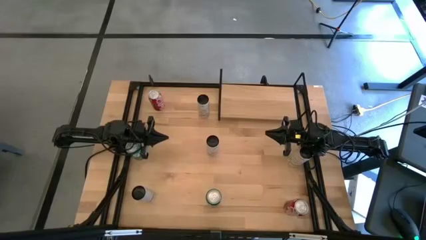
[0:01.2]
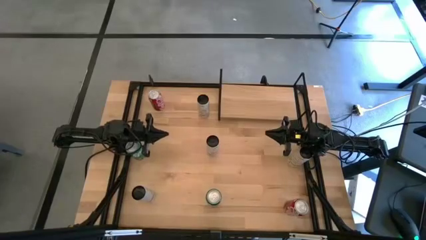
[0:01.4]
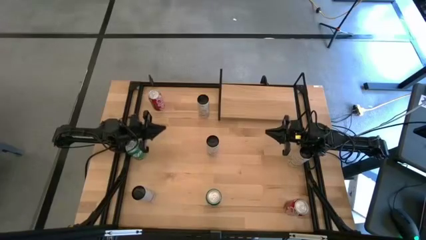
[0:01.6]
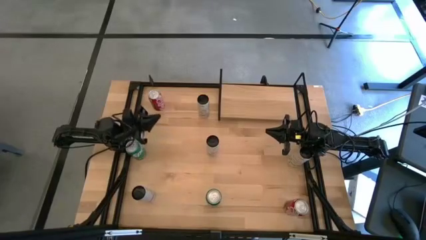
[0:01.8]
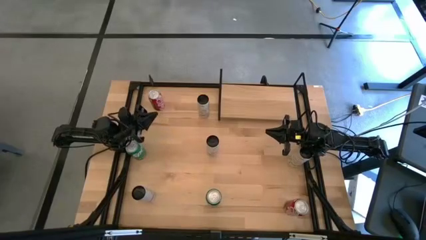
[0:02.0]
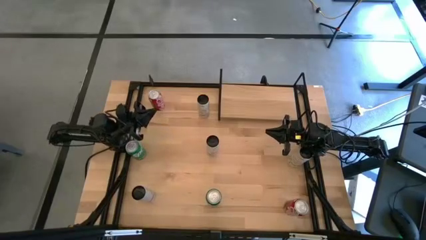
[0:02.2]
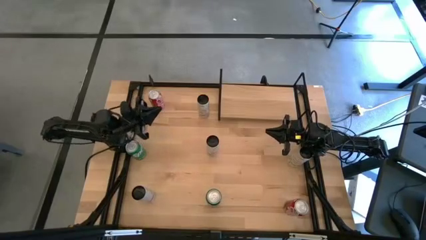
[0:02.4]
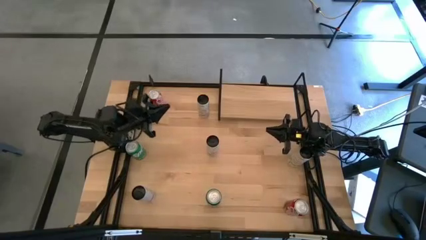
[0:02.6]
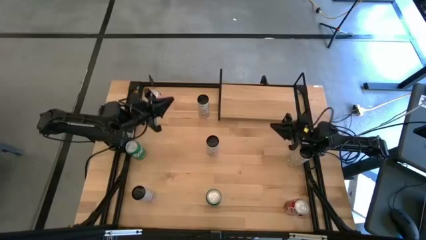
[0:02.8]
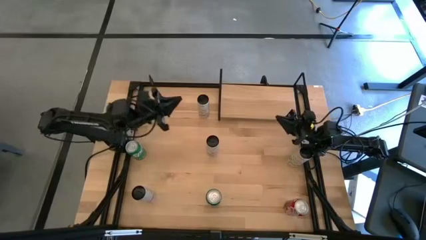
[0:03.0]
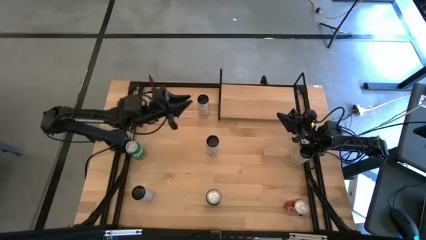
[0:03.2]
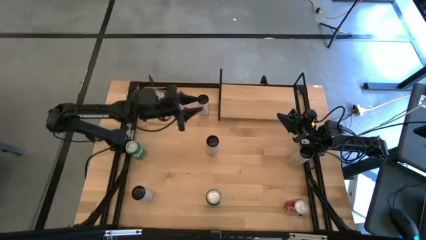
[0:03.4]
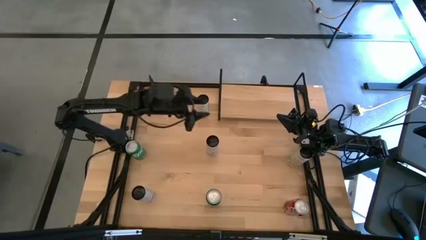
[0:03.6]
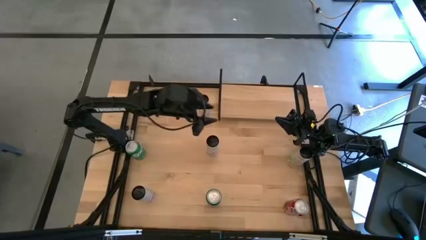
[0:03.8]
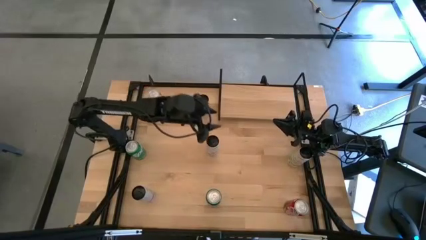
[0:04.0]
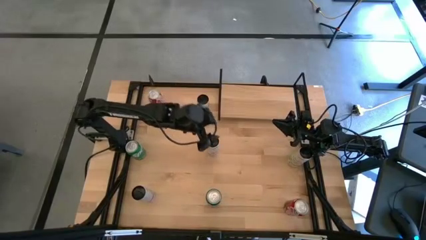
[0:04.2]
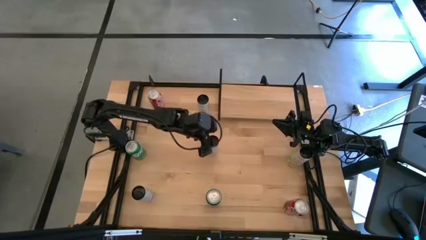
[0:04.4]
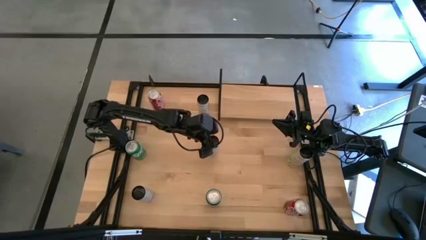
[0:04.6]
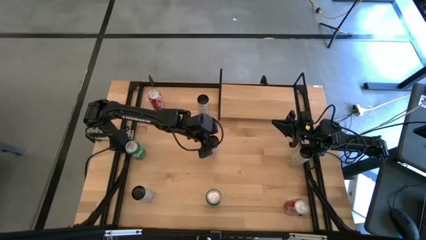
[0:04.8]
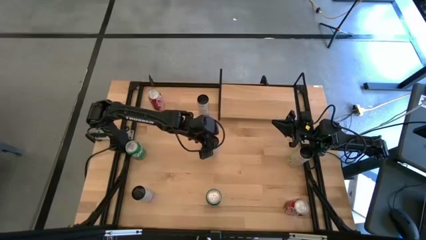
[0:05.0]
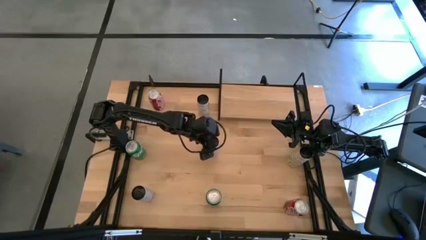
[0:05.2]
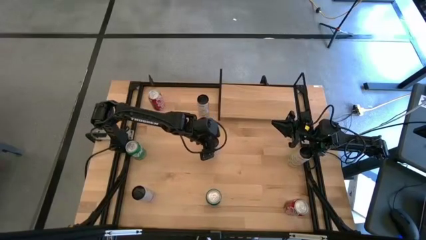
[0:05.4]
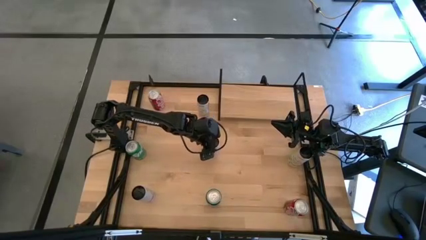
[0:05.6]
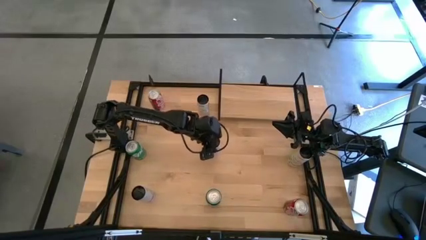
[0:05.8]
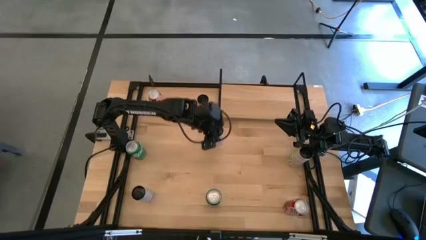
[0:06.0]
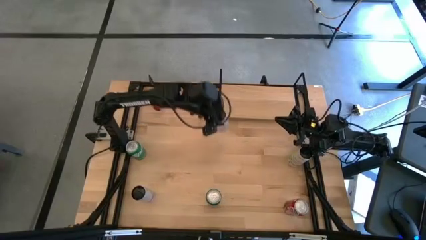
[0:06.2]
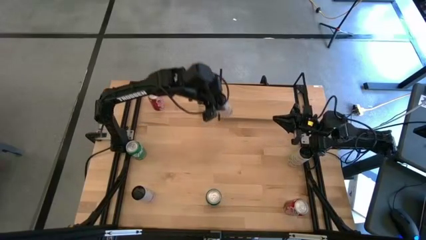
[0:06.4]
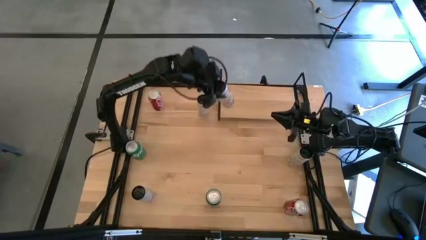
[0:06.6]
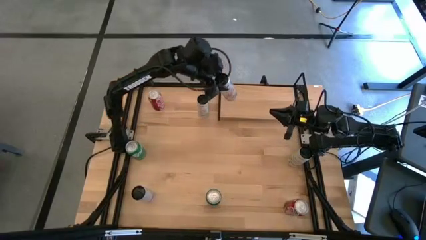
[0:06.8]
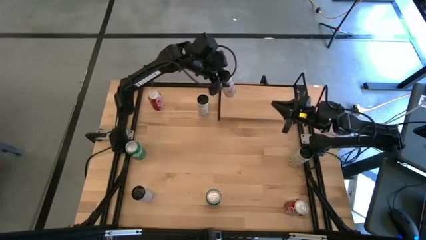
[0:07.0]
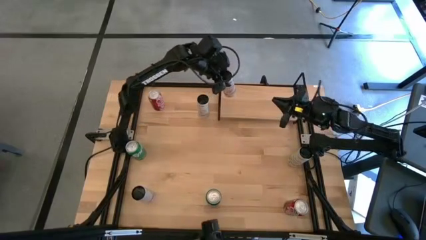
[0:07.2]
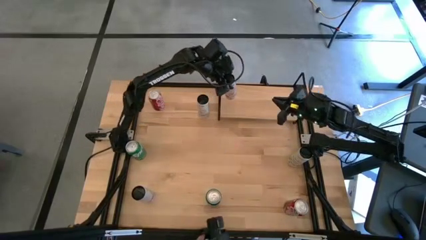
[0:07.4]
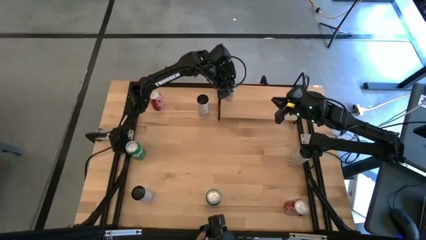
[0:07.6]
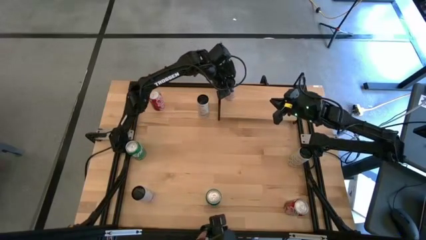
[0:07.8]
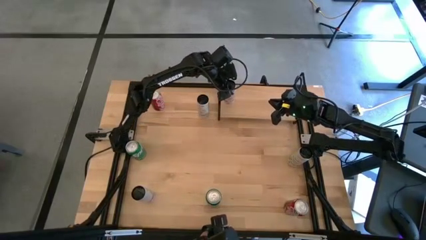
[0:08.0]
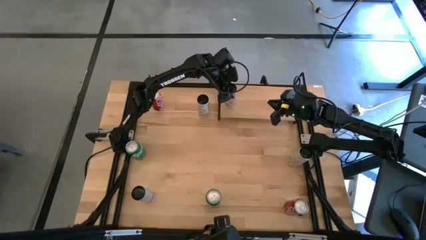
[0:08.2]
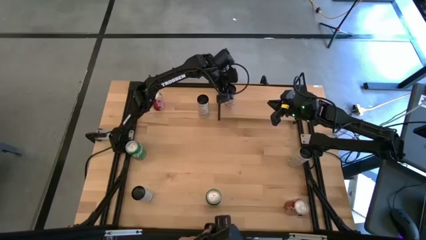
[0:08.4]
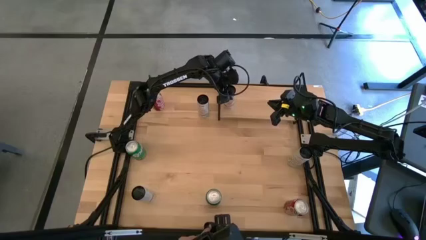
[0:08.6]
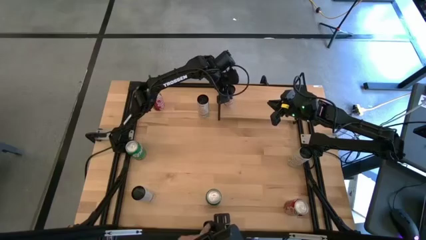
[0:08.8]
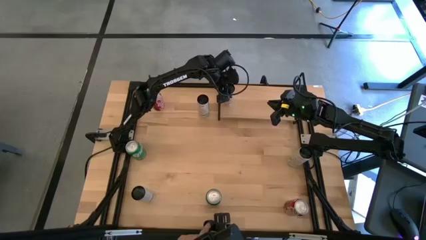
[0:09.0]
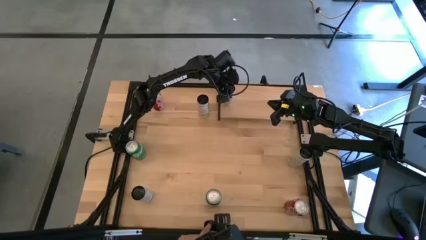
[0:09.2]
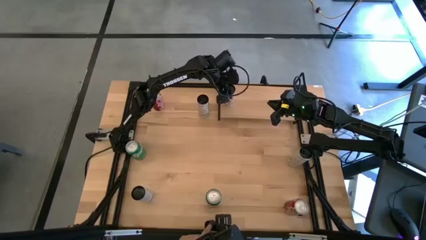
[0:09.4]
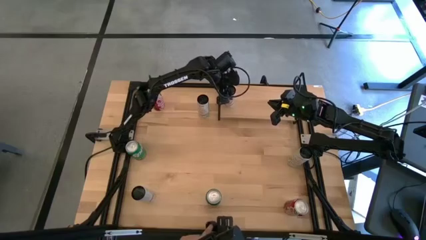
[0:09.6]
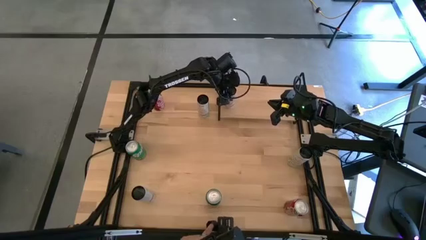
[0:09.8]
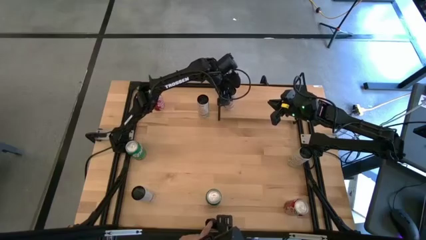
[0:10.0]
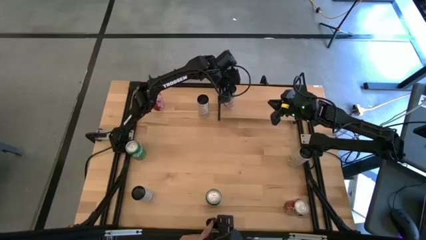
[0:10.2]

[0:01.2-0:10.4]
Task: Place canned beverage on shelf
Put the top white-pink soda can on the shelf
